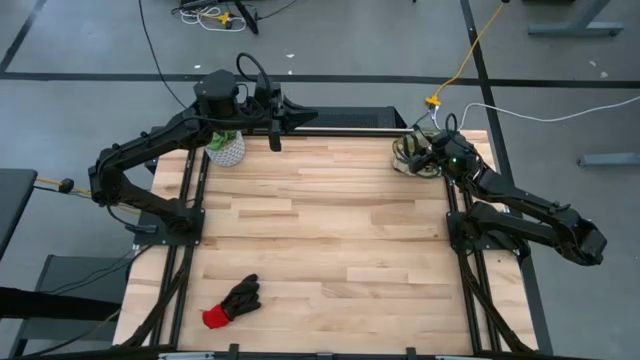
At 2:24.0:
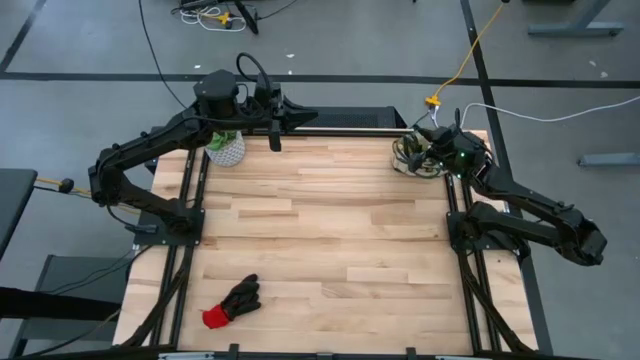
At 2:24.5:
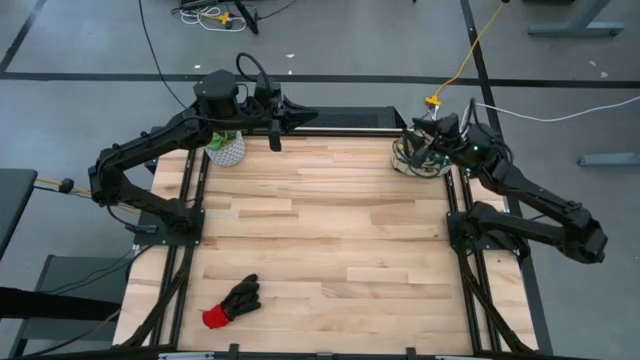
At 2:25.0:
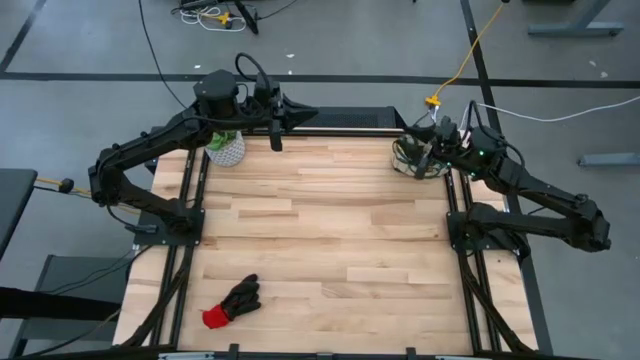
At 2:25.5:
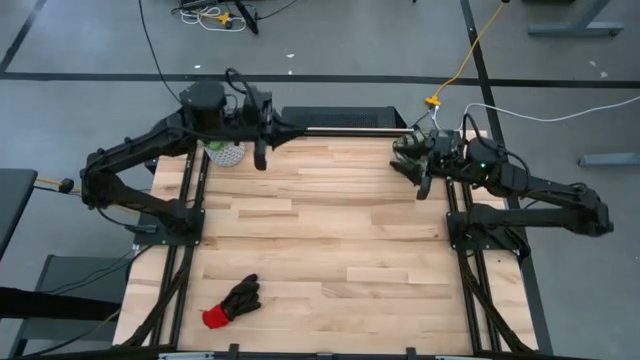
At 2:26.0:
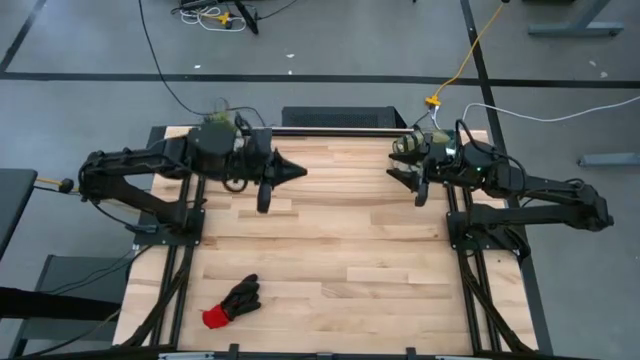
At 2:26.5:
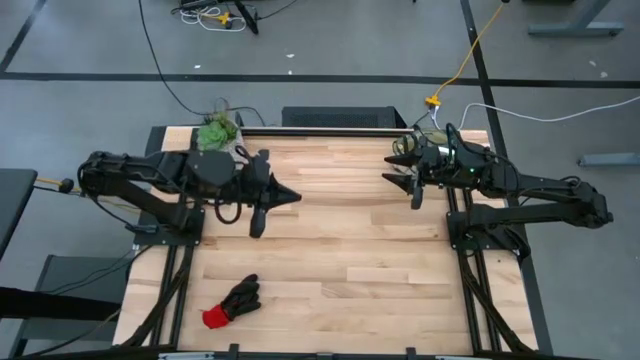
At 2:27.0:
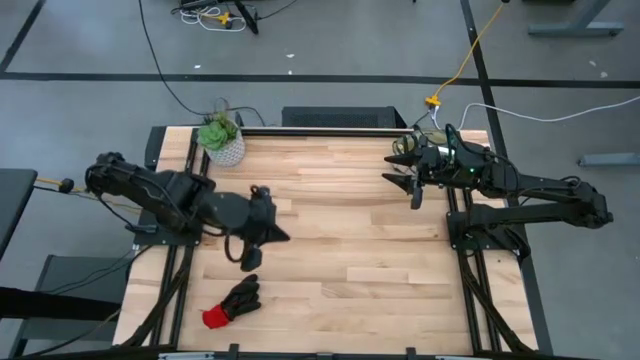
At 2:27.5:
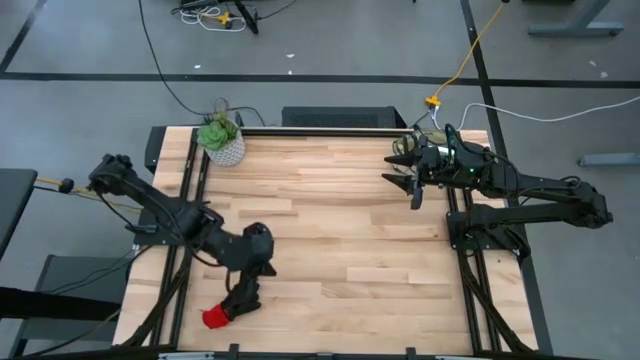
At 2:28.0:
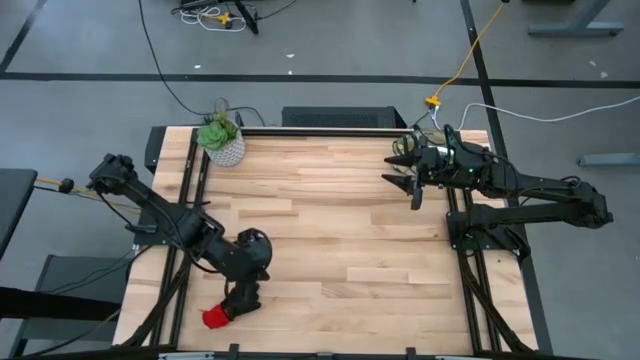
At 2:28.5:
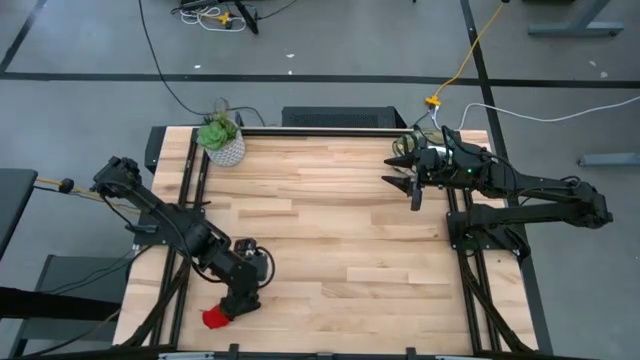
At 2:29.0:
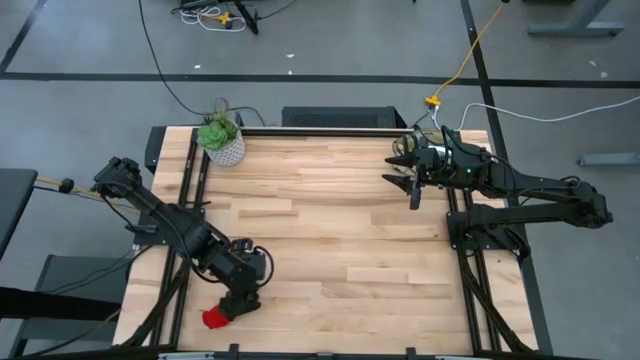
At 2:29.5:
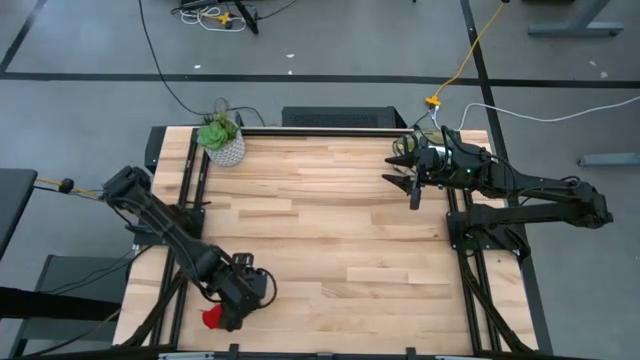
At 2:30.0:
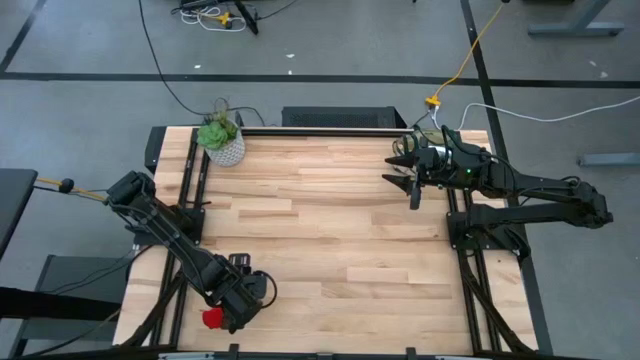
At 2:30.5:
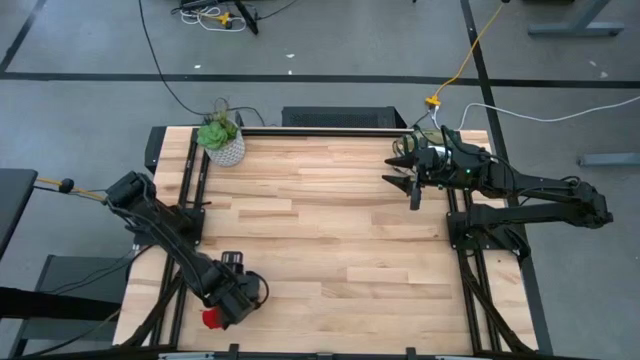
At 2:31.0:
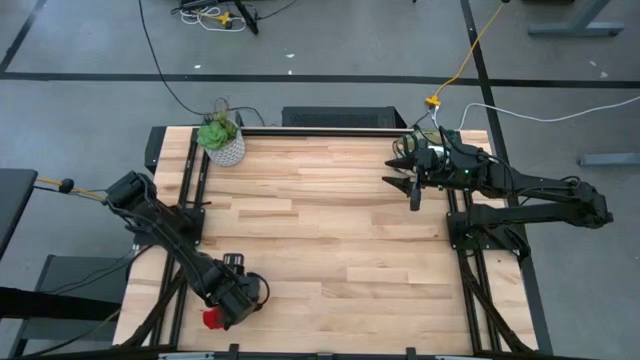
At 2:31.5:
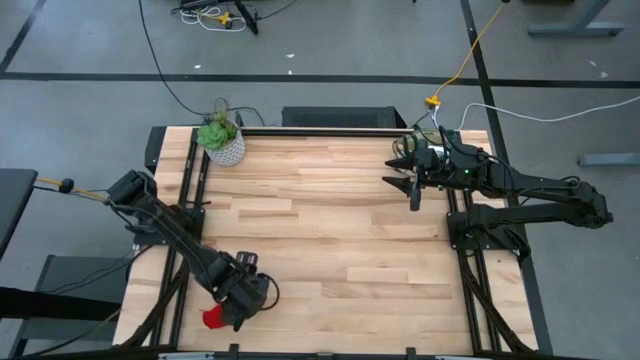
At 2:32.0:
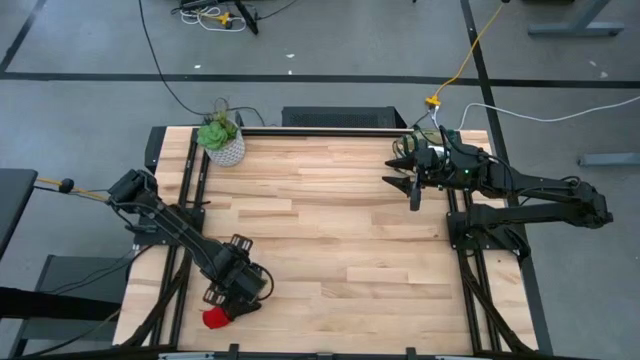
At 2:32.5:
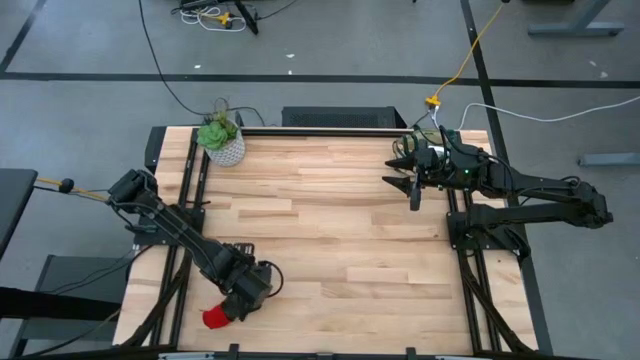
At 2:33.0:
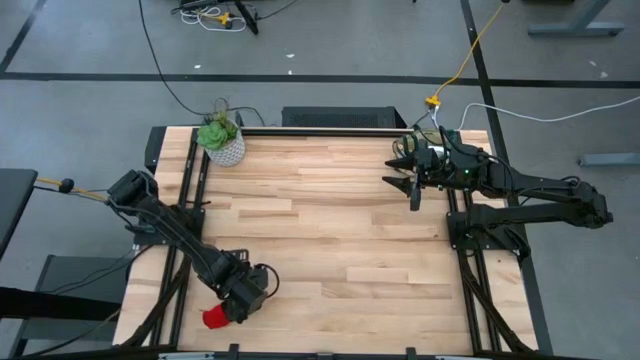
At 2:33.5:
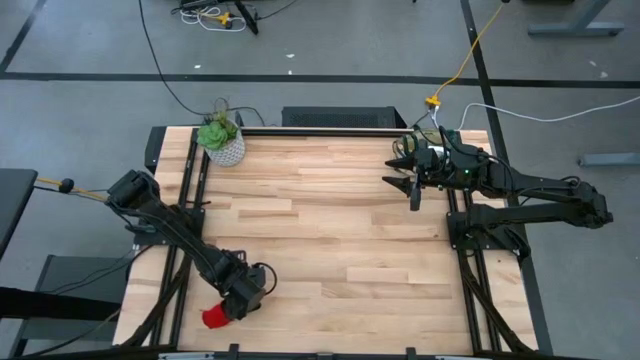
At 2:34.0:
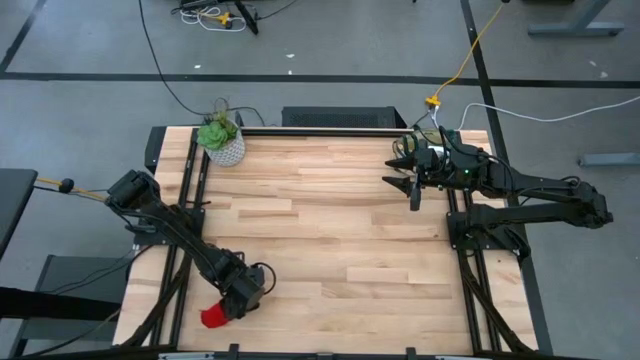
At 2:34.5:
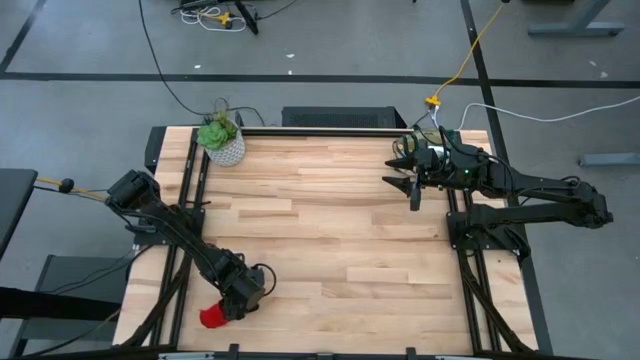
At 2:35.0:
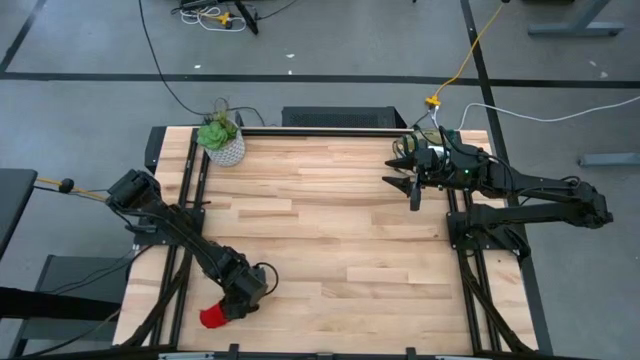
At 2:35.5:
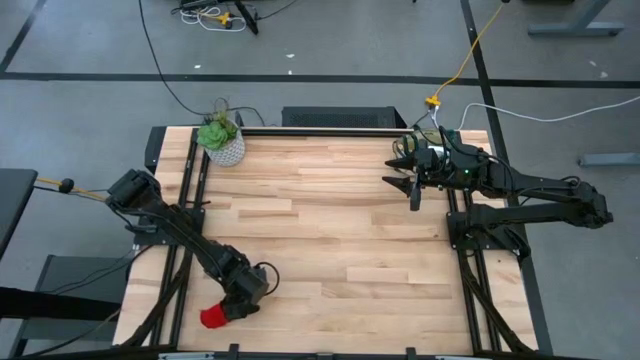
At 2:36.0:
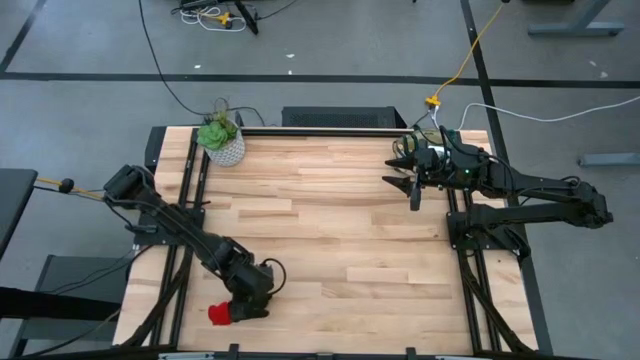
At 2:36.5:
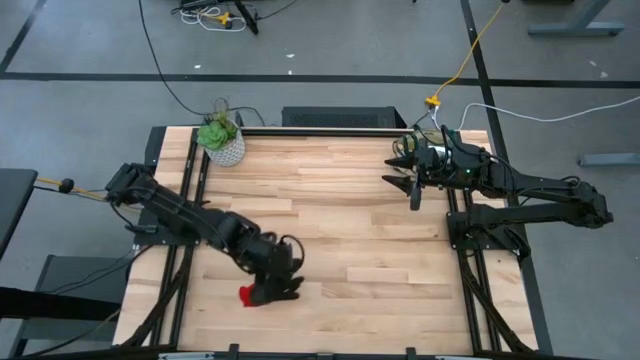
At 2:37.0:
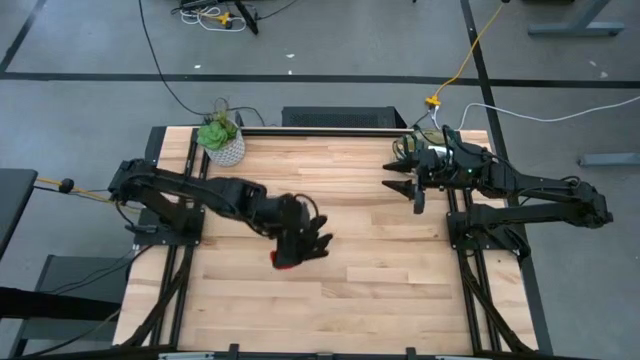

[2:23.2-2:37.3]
Task: Pick & Place Garden tools in Gardening bag
Put the red gloves into the brown gardening bag

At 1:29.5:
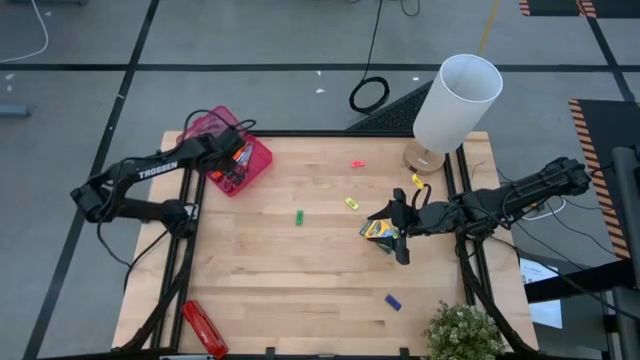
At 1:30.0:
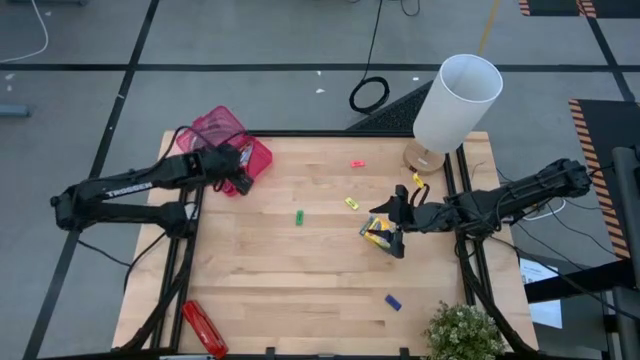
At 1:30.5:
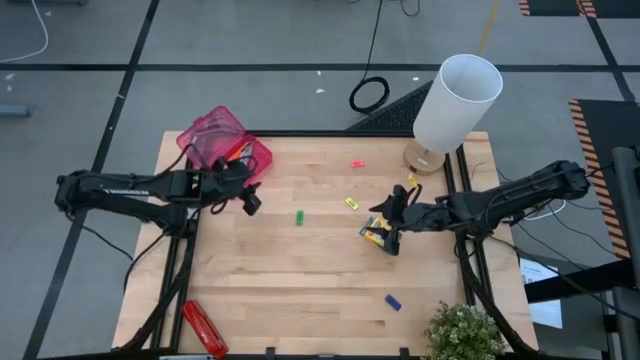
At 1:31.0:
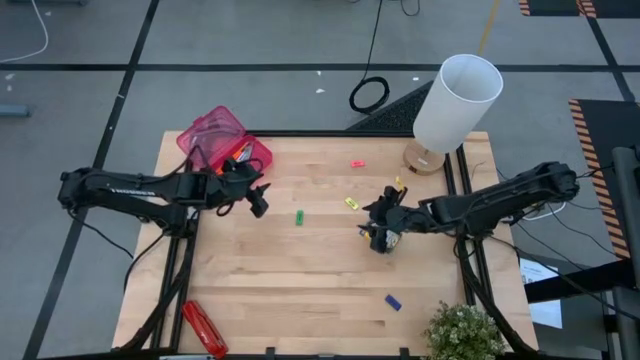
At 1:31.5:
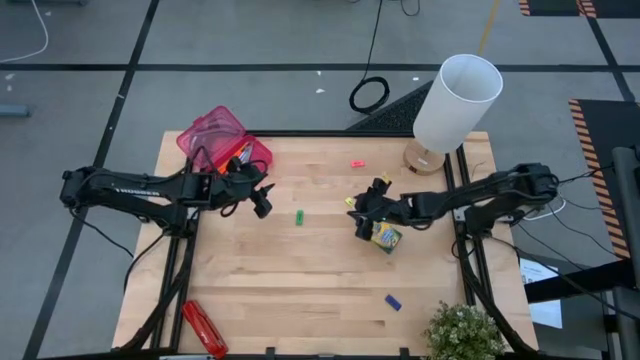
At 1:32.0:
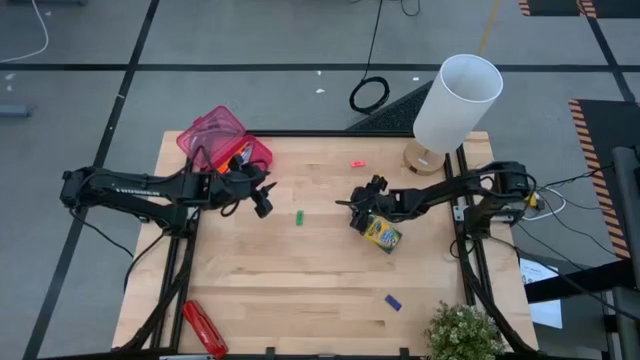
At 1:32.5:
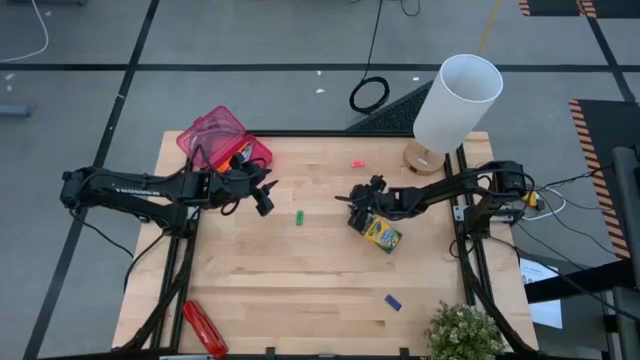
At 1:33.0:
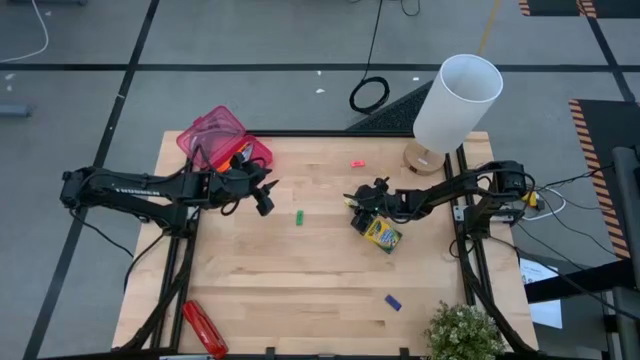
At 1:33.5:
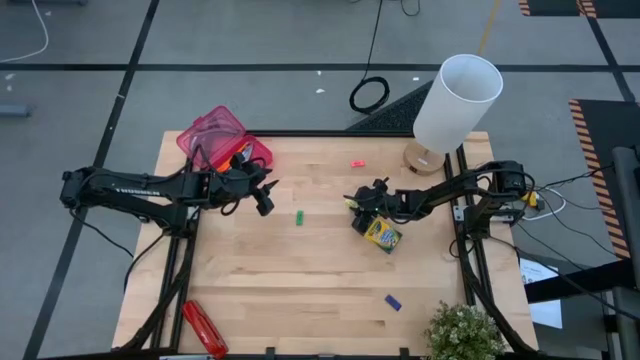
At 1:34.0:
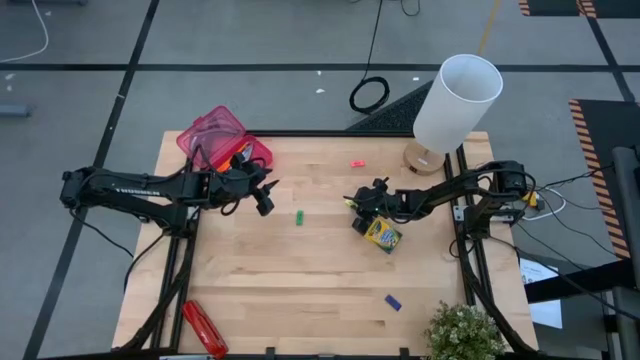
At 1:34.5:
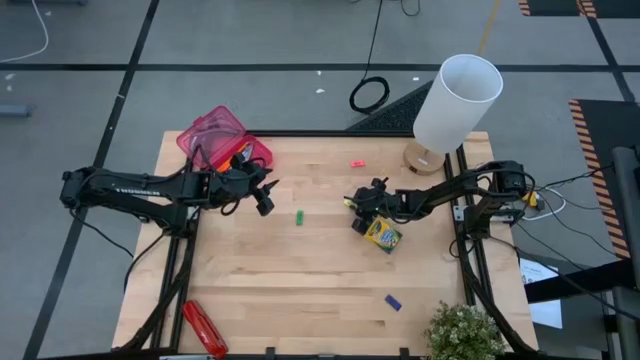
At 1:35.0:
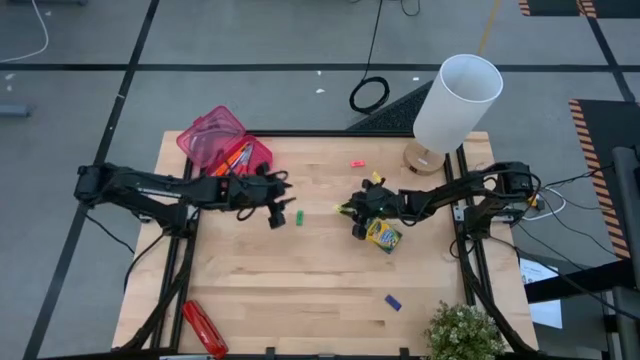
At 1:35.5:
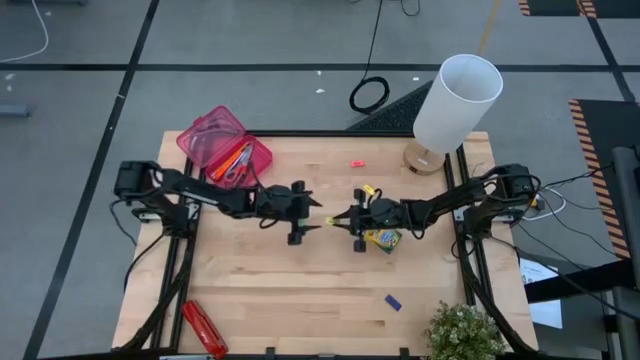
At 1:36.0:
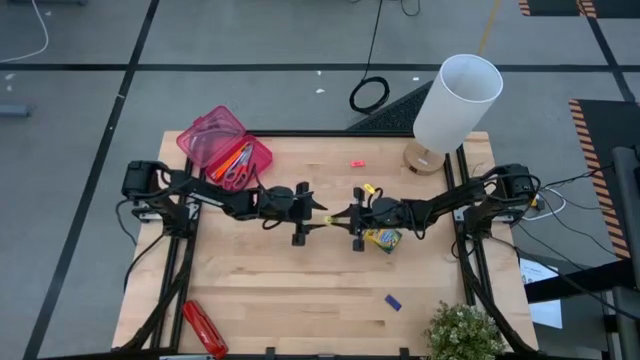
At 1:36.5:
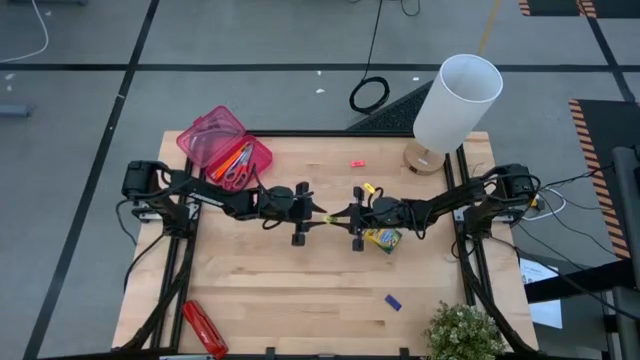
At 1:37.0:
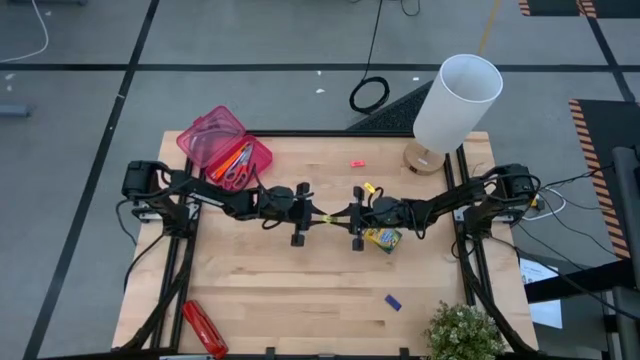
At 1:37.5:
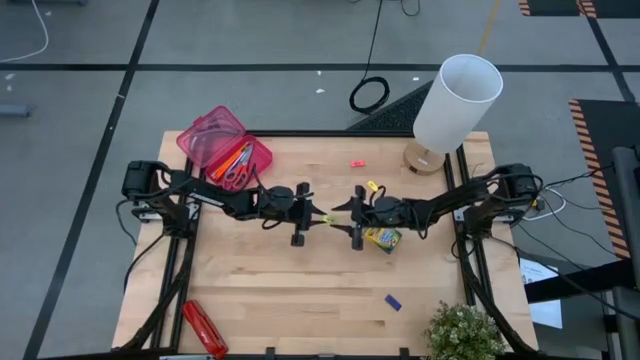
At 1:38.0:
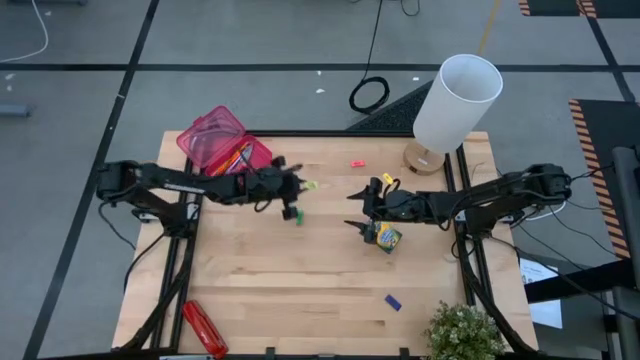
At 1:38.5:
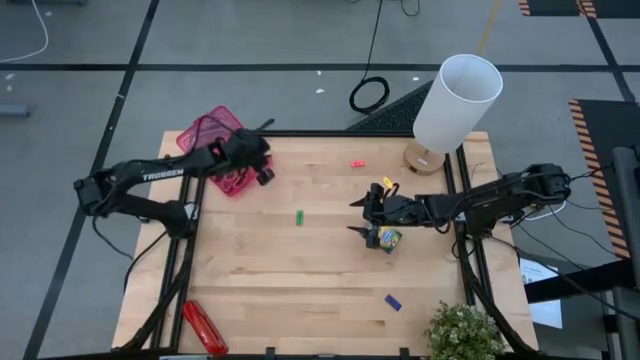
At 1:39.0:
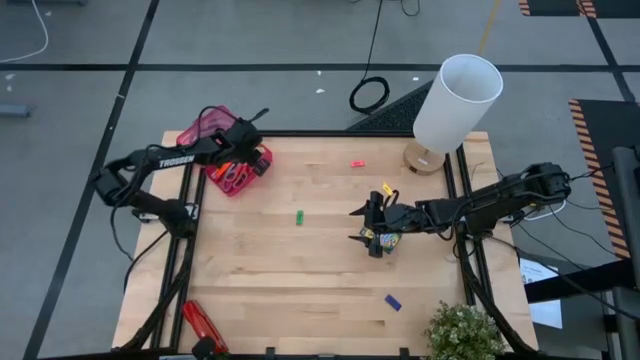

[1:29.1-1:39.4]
Task: Pack school essentials
Put the light green eraser into the pink supply box
